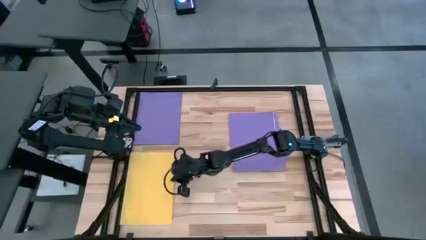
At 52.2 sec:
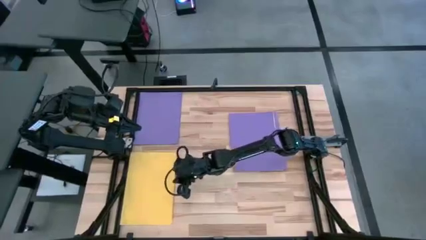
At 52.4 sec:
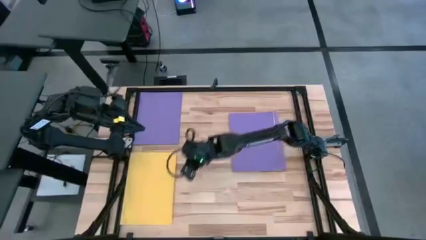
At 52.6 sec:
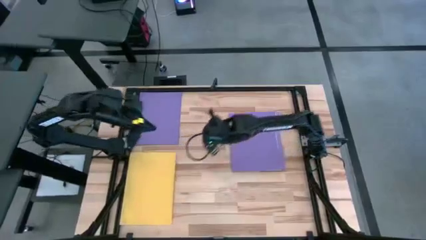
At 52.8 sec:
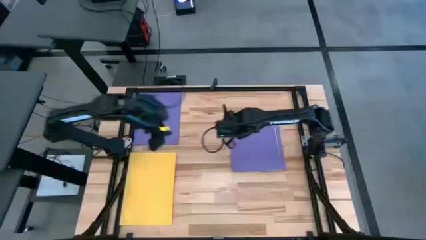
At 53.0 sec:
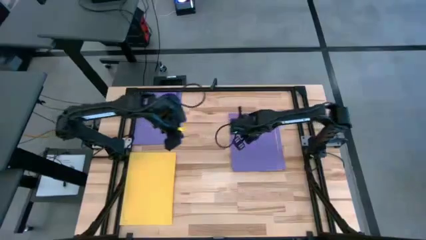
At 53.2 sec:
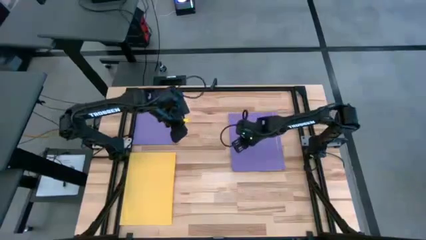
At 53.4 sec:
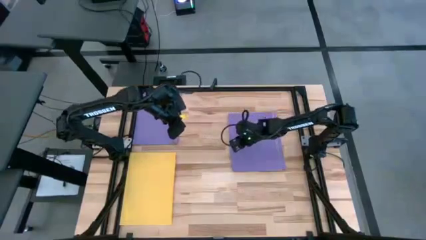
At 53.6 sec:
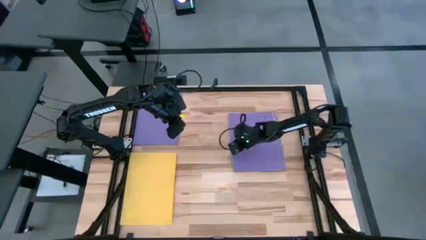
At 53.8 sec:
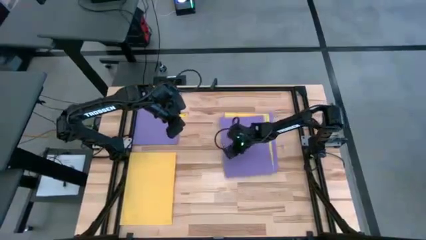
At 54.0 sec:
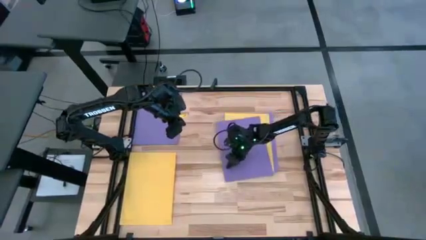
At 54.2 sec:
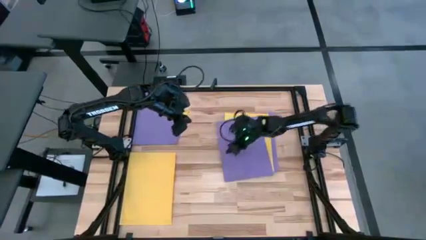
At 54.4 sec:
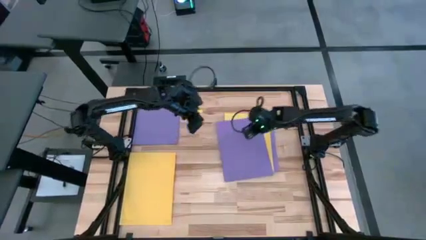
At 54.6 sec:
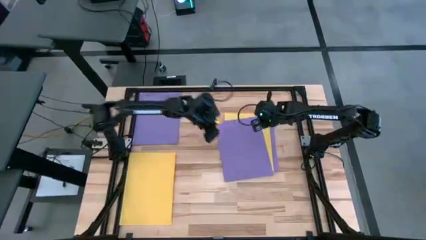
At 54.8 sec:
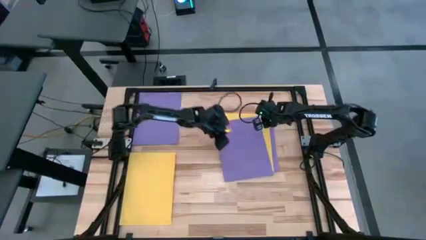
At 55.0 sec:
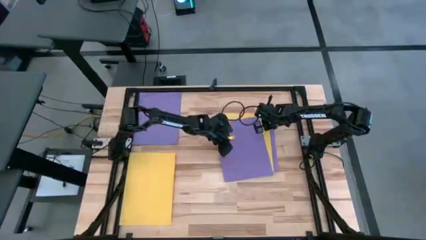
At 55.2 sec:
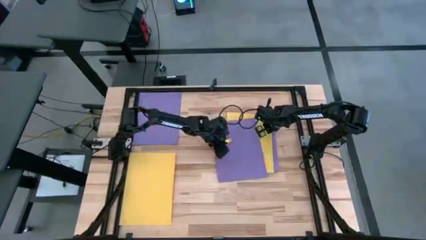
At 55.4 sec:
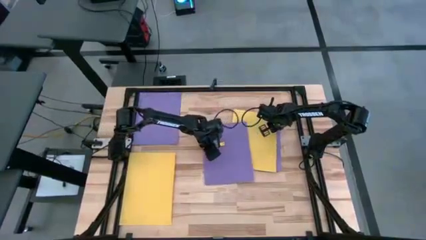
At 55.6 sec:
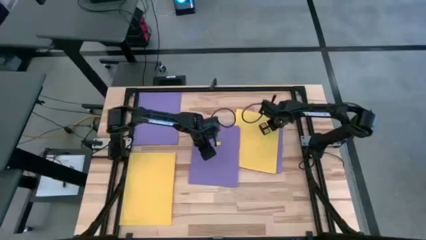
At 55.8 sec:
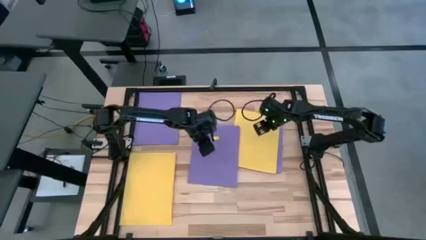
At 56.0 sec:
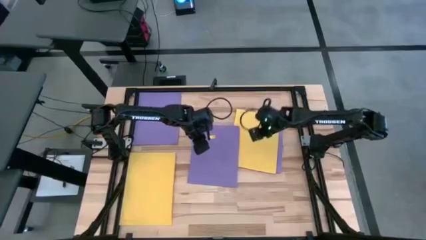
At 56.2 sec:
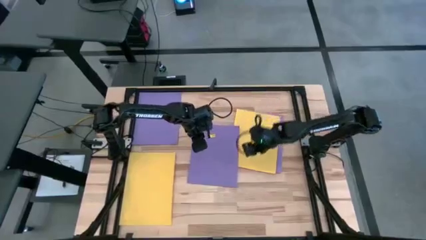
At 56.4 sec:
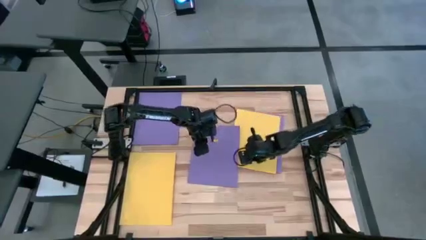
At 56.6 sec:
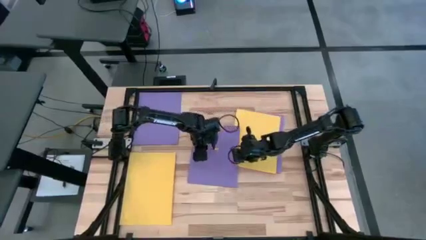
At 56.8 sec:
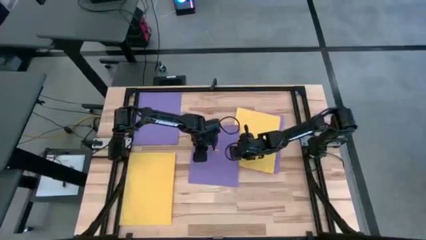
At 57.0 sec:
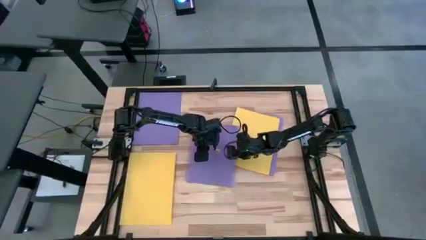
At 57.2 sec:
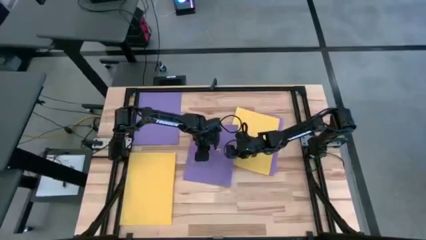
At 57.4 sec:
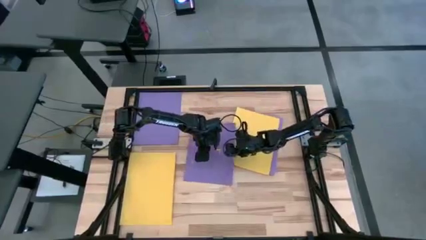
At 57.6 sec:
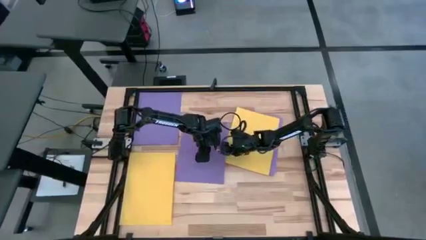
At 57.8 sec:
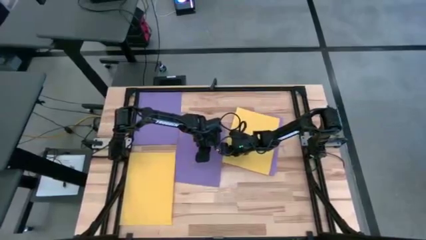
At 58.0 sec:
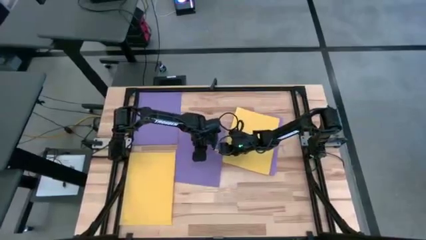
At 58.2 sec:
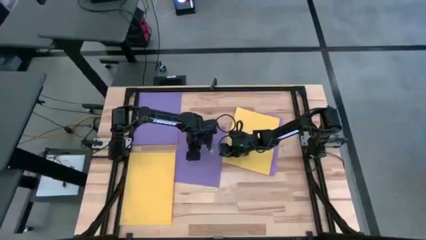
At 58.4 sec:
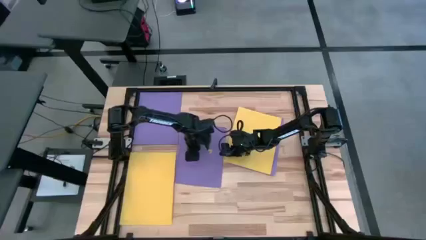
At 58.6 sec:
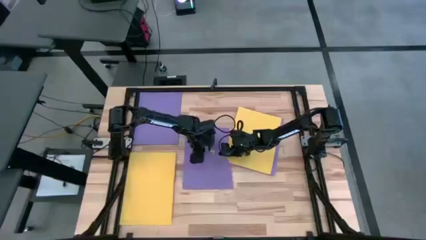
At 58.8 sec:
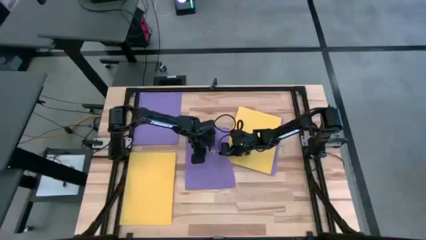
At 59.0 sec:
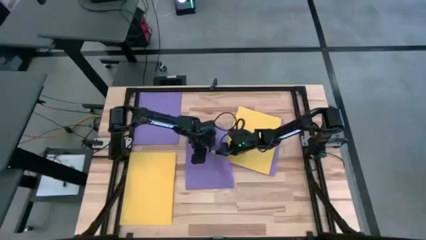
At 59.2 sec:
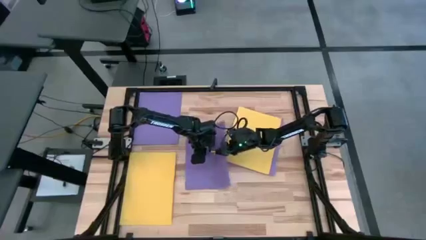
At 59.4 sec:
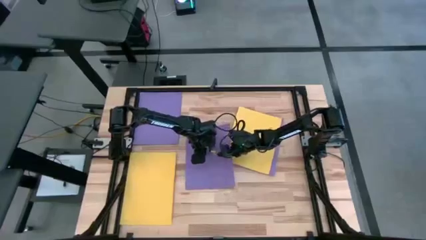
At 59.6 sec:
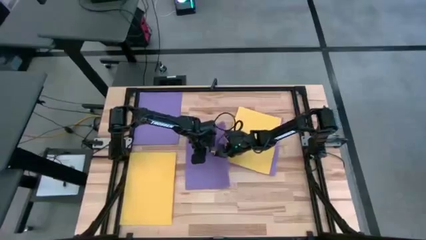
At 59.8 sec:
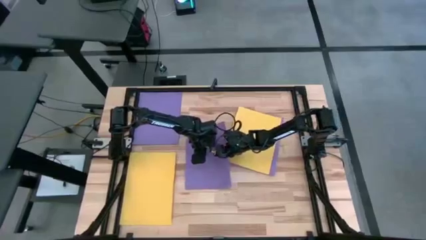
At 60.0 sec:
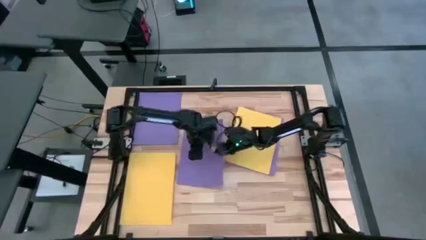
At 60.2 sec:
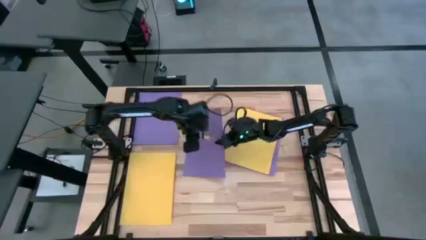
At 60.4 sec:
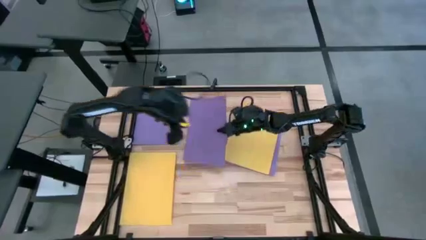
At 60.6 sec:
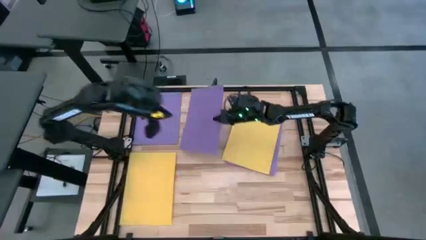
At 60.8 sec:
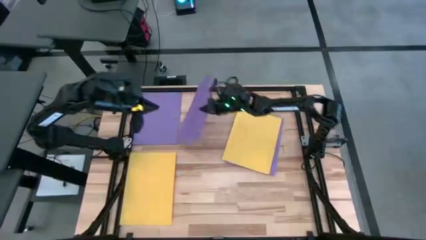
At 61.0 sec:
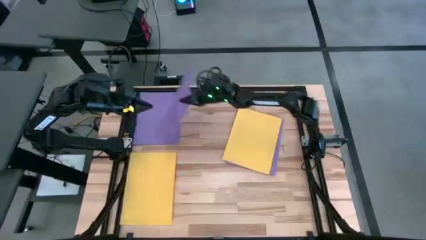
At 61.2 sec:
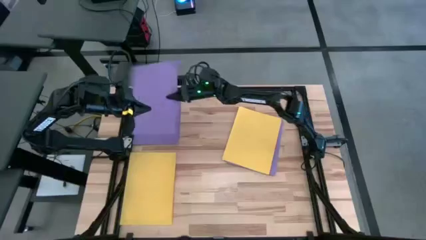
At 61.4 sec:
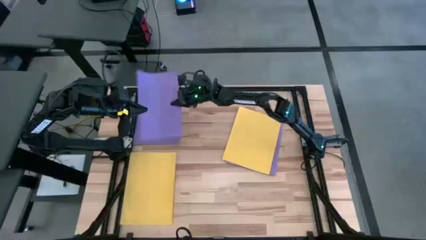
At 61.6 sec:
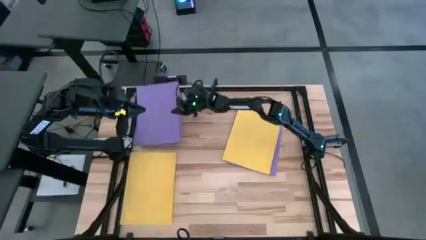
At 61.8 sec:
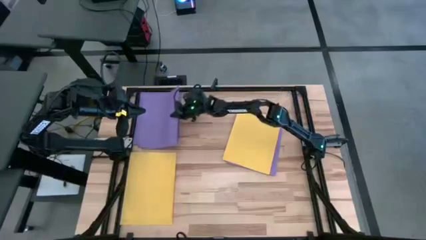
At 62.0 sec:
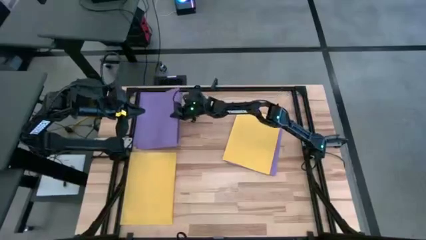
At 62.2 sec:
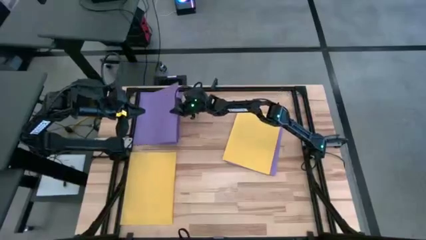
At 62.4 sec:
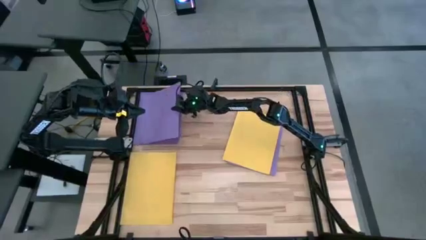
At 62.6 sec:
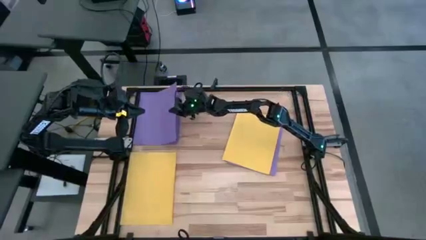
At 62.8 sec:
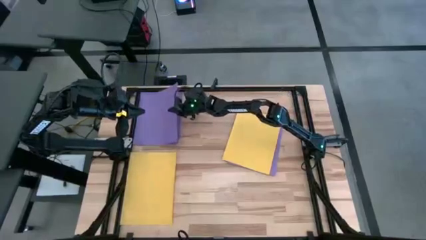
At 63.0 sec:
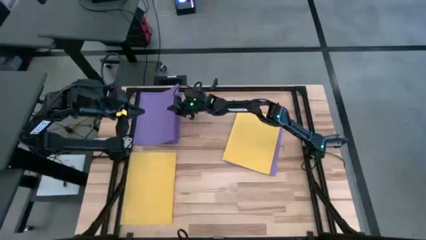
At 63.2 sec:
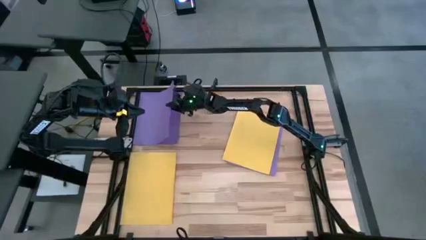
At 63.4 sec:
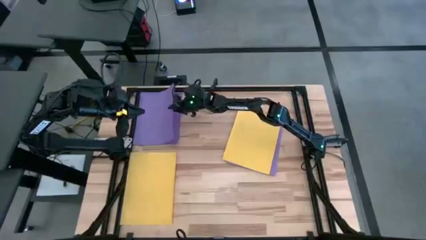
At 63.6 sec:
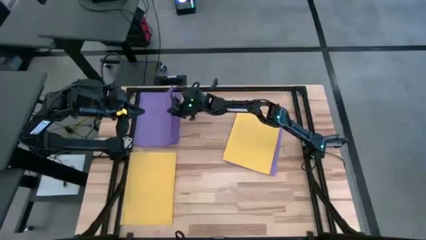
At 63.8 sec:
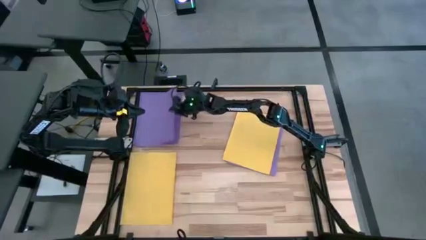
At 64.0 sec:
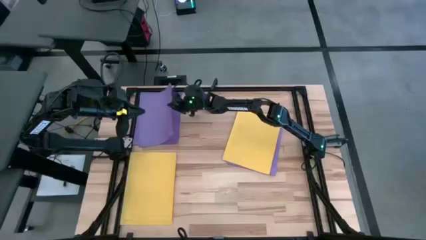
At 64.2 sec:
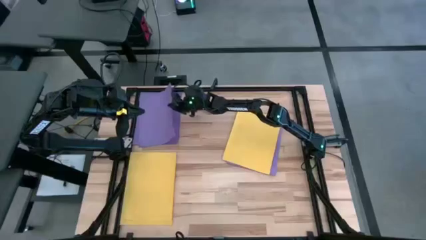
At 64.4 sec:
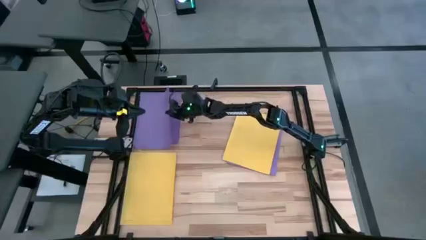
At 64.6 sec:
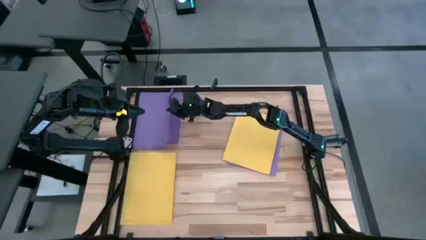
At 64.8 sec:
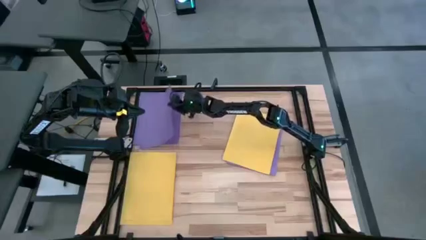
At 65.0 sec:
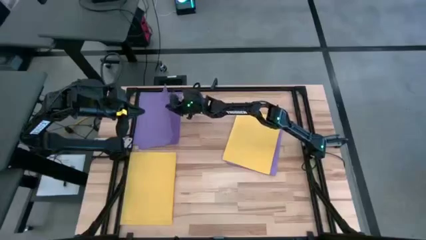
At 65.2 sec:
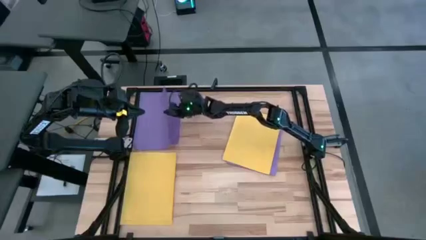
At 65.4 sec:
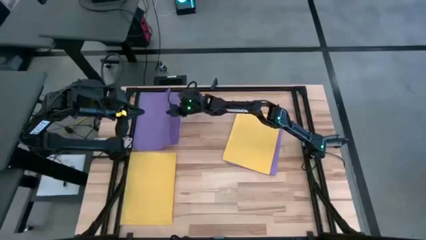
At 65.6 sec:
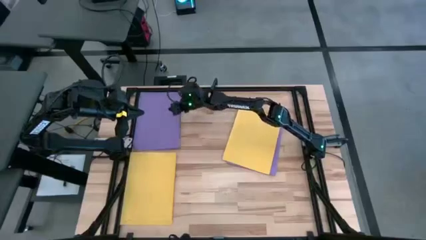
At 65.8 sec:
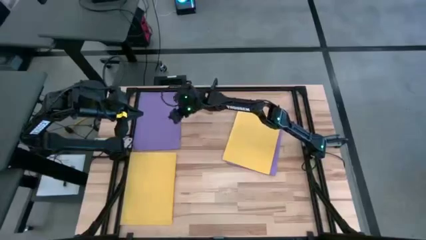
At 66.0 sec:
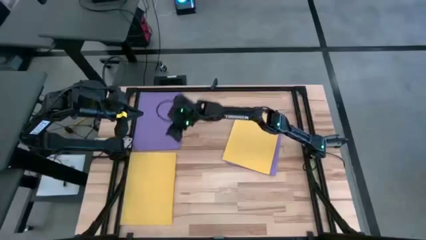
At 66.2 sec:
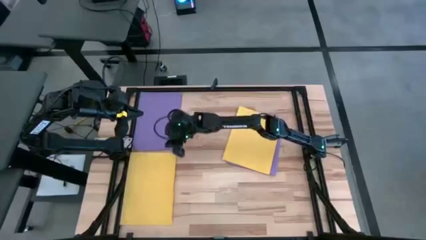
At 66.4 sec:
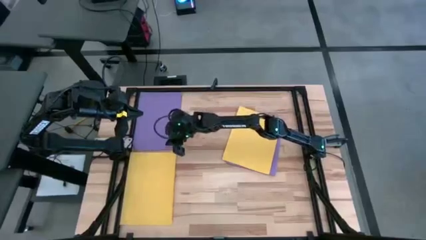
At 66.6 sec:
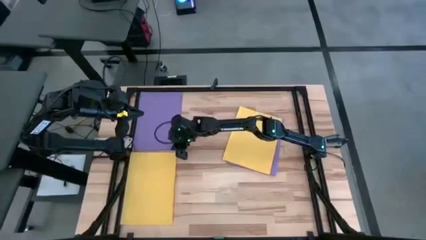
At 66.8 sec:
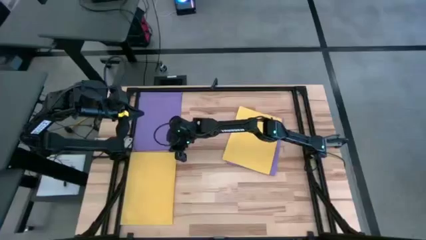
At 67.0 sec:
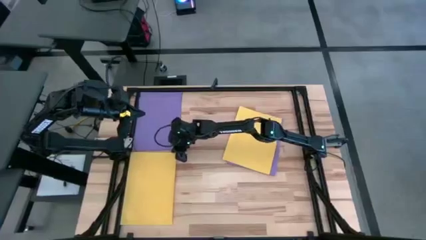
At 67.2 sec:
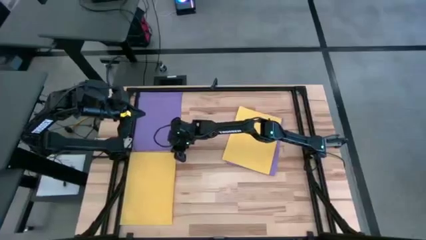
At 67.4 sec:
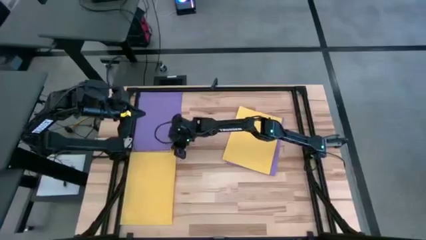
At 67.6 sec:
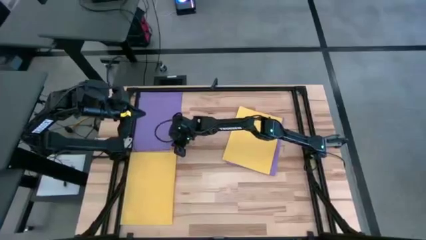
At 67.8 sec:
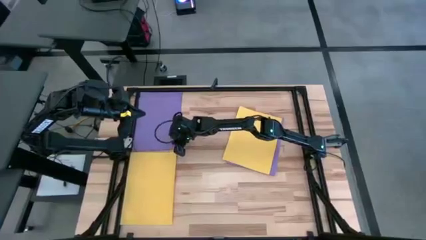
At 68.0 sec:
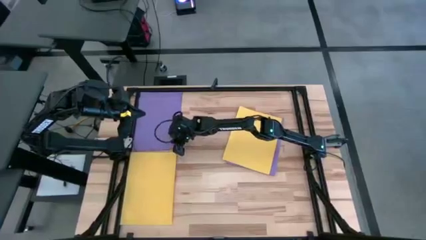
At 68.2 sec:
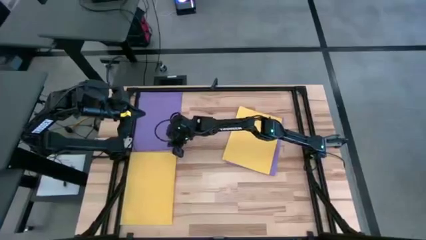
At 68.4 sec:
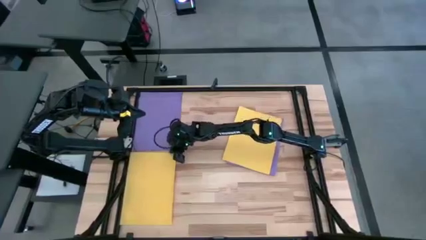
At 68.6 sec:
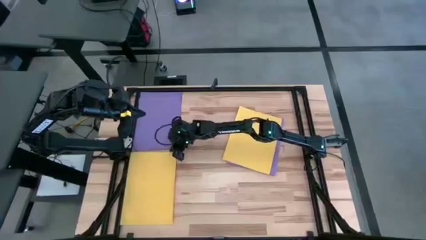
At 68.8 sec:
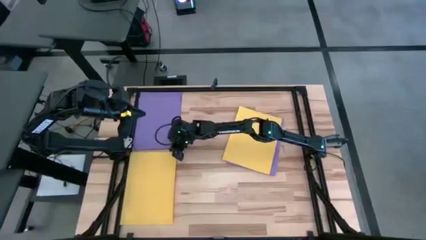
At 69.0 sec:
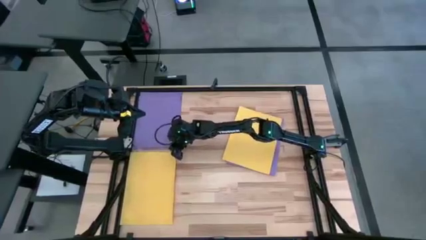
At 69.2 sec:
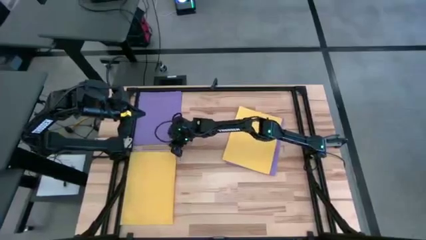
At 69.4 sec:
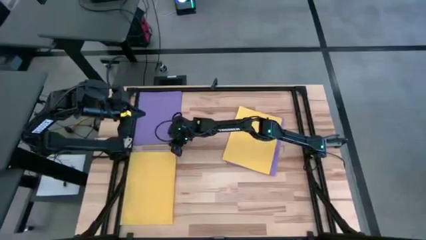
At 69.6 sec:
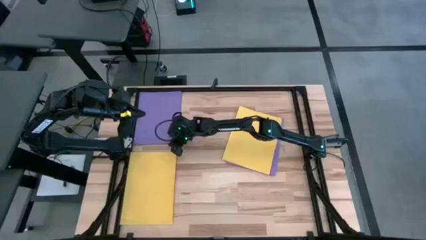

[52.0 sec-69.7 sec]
Task: Organize paper
Stack the purple paper on top of the other purple paper
